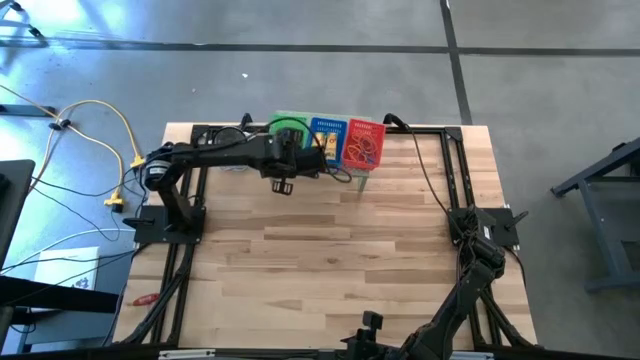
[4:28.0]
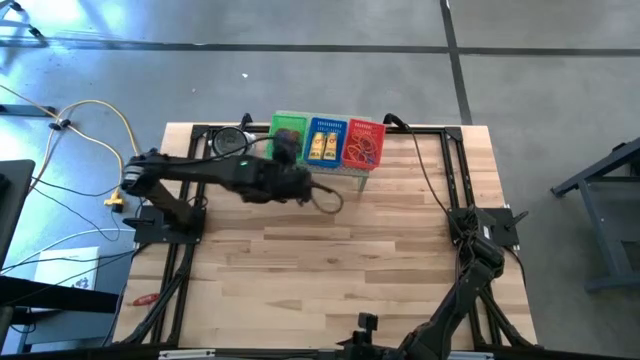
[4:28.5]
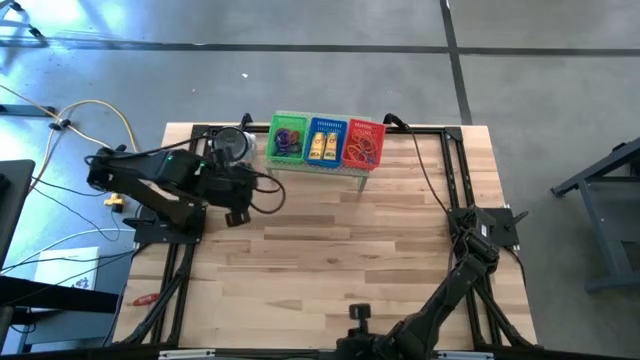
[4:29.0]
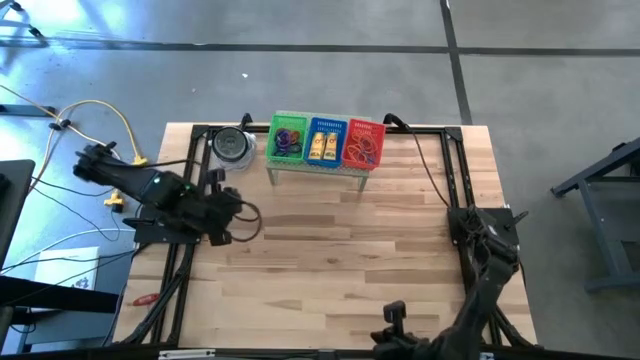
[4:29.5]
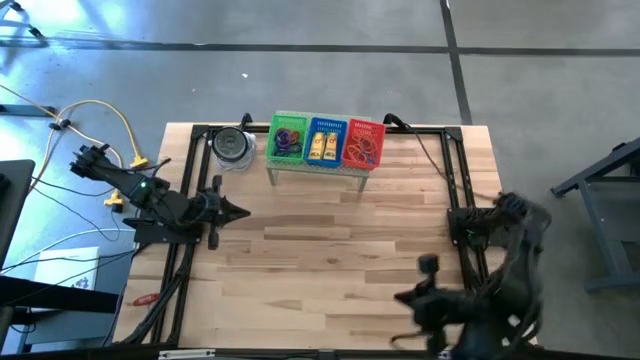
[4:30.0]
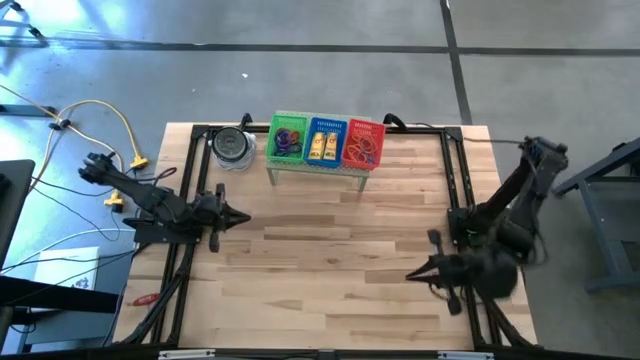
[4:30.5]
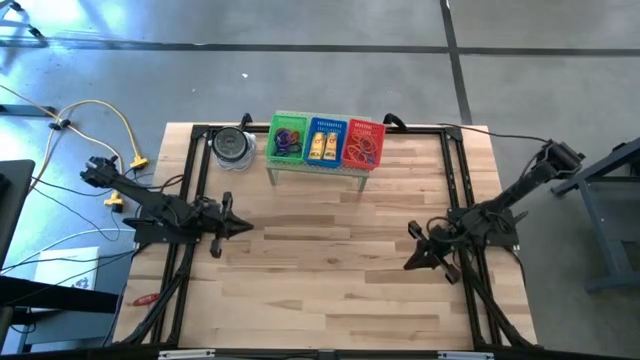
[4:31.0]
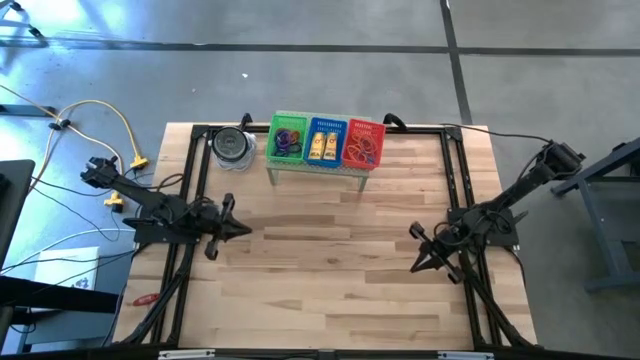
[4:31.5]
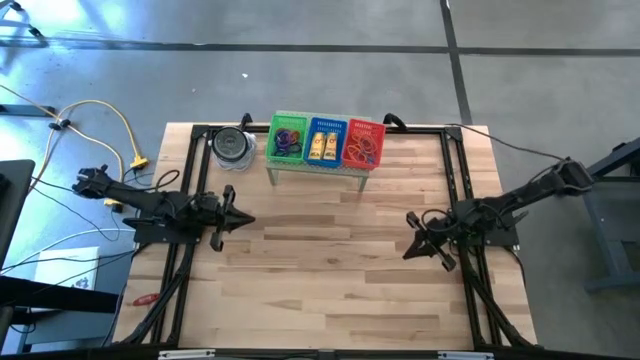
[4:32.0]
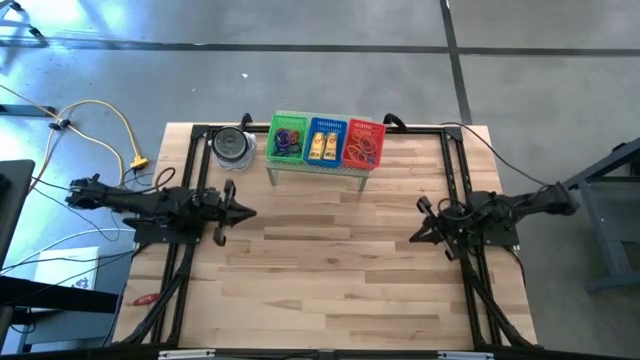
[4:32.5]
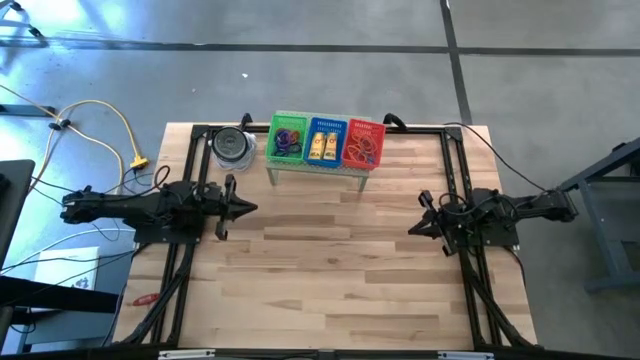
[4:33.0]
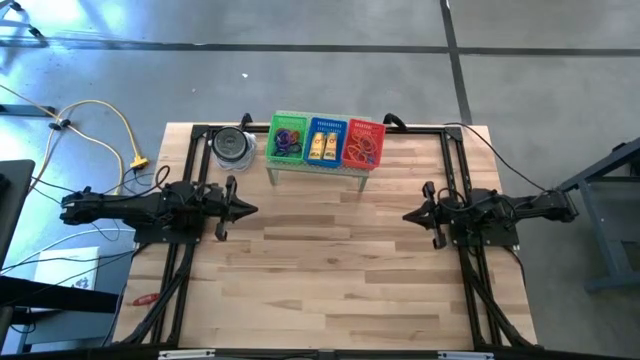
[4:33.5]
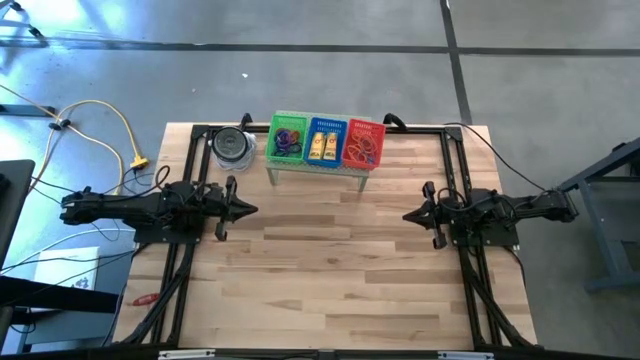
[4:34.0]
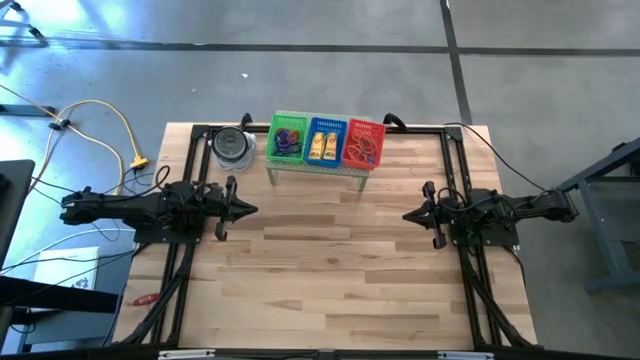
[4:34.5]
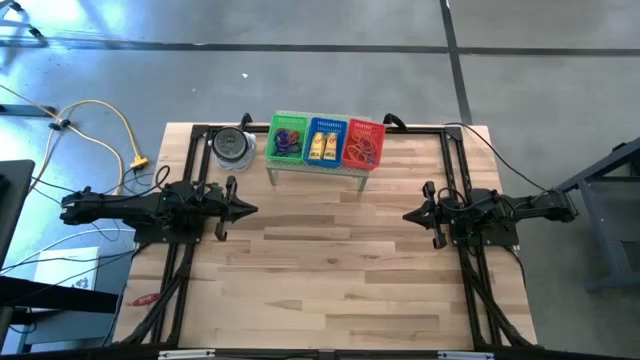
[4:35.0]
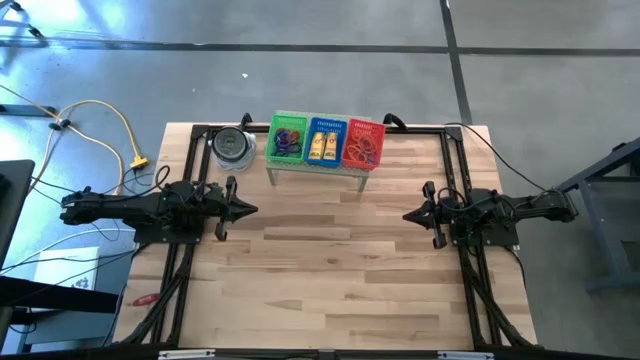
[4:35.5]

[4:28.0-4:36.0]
Task: Pick & Place Office Desk Supplies
Return to Home Position

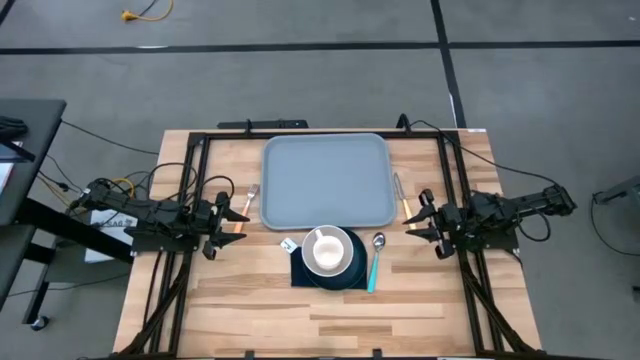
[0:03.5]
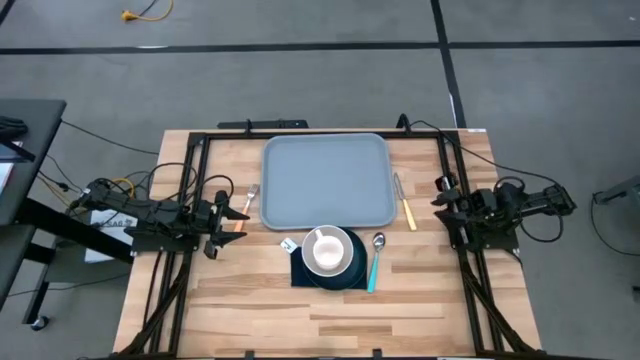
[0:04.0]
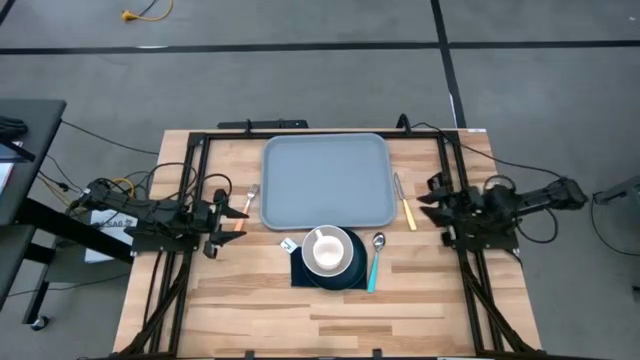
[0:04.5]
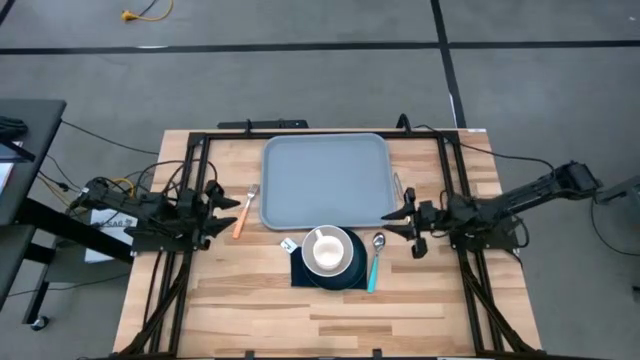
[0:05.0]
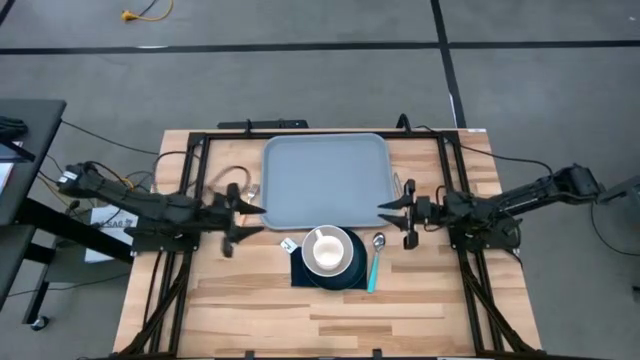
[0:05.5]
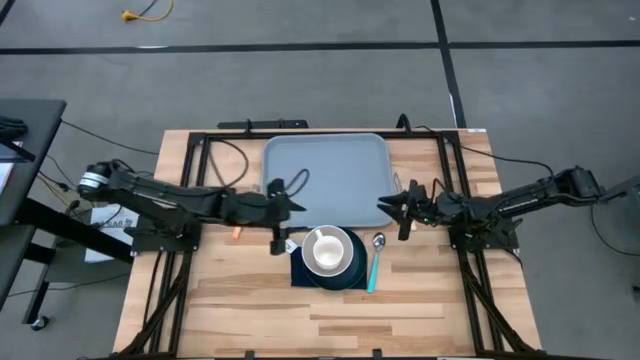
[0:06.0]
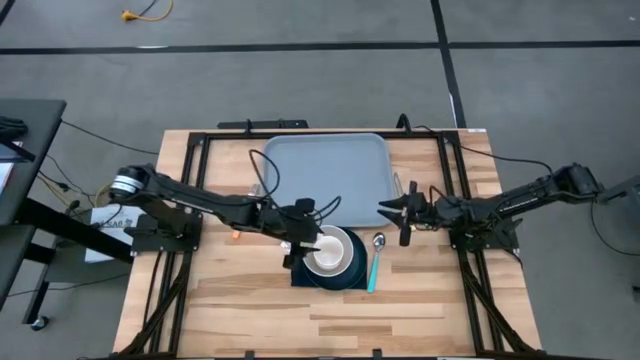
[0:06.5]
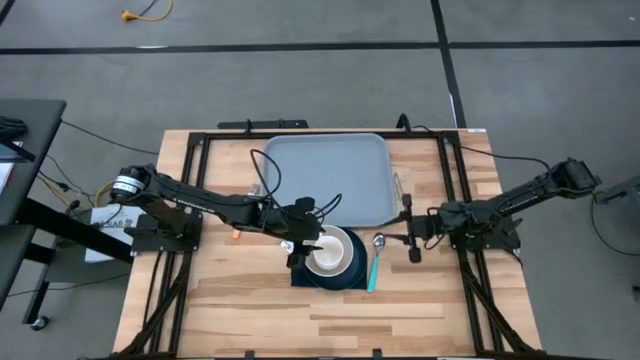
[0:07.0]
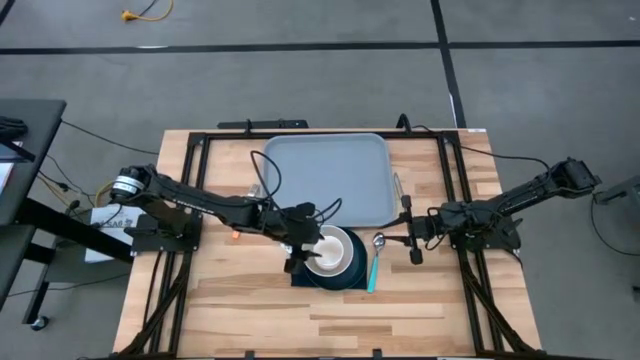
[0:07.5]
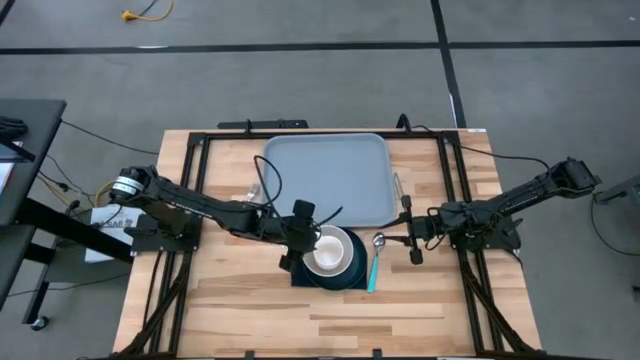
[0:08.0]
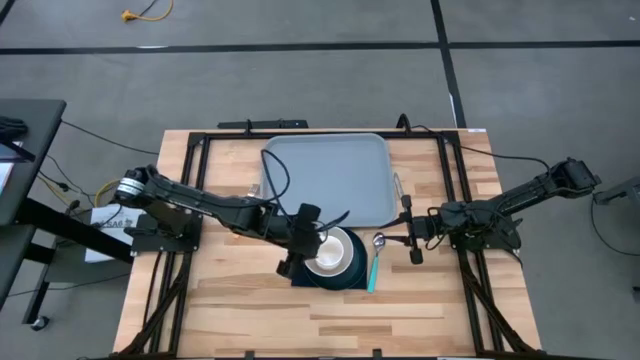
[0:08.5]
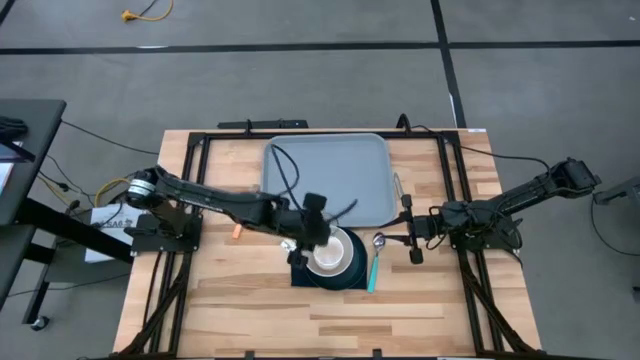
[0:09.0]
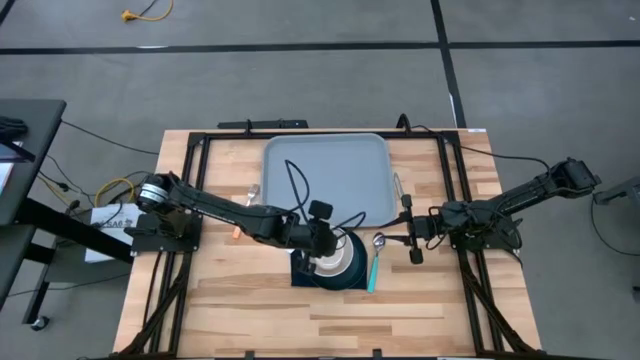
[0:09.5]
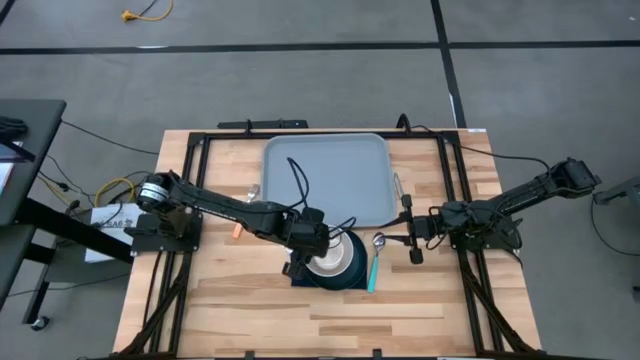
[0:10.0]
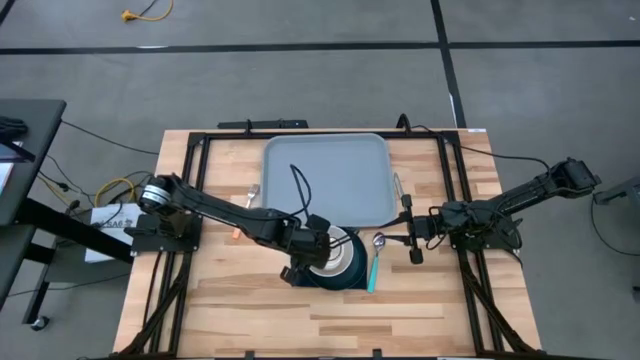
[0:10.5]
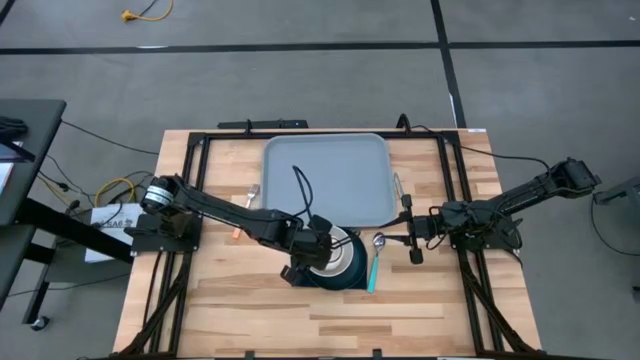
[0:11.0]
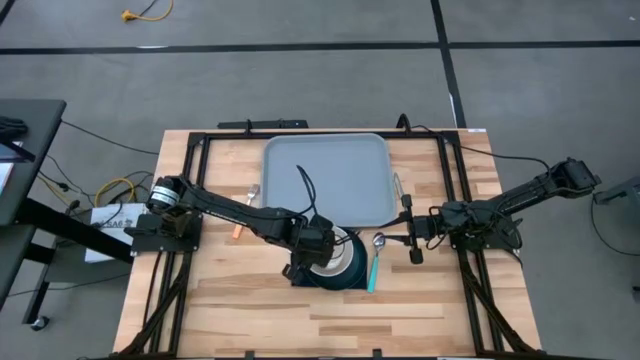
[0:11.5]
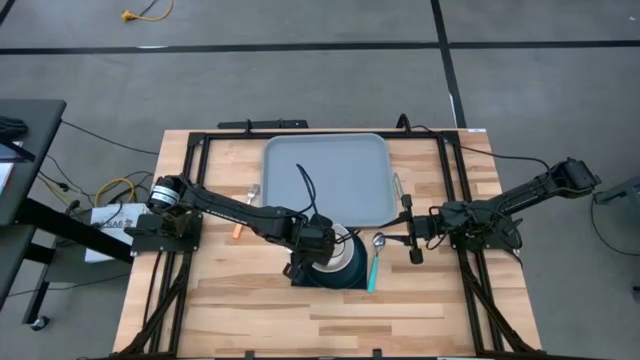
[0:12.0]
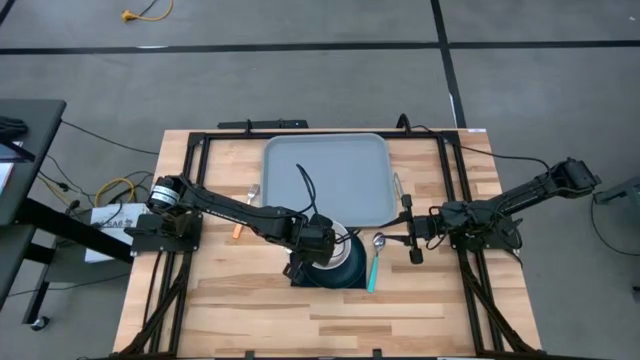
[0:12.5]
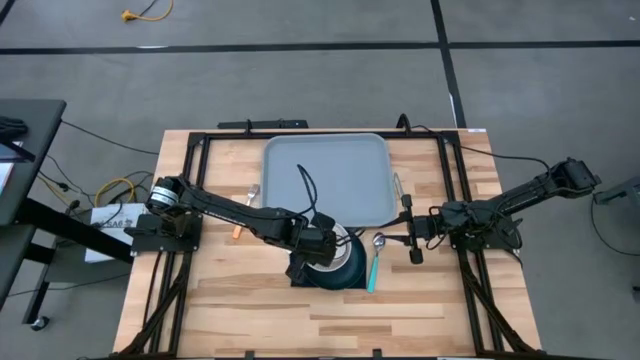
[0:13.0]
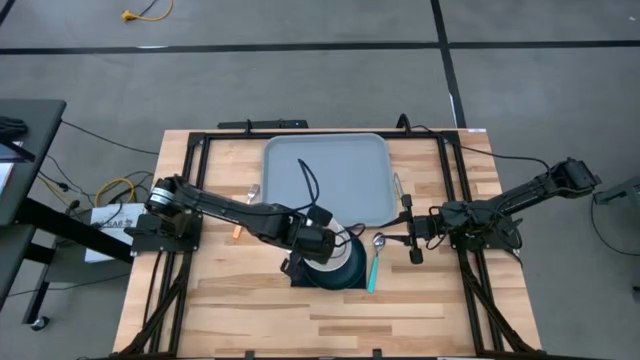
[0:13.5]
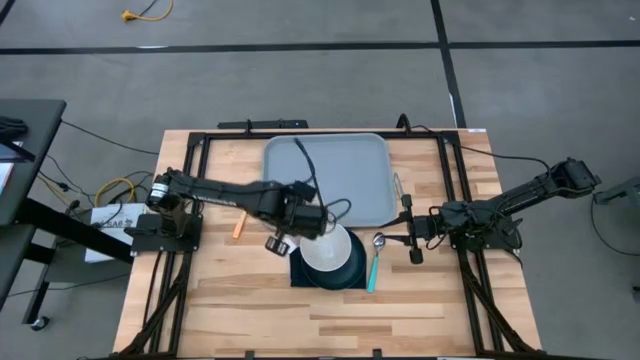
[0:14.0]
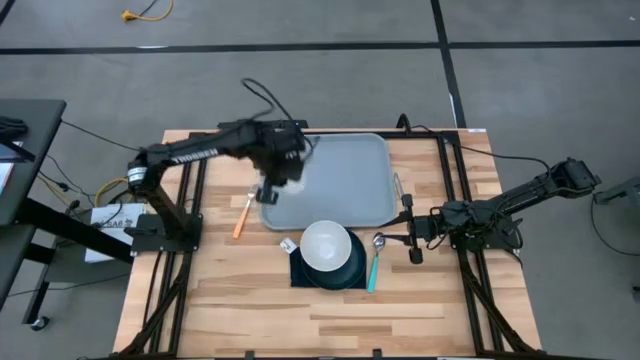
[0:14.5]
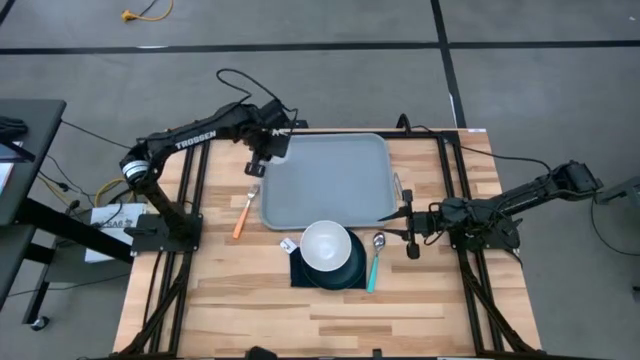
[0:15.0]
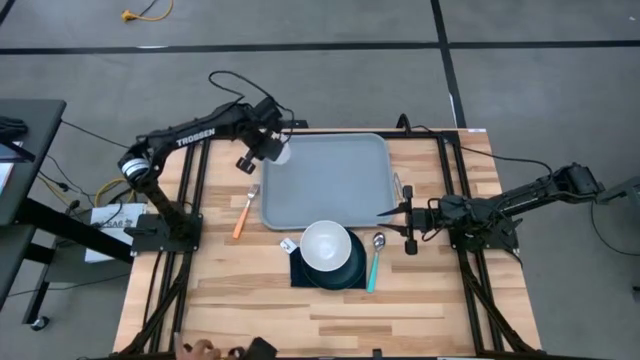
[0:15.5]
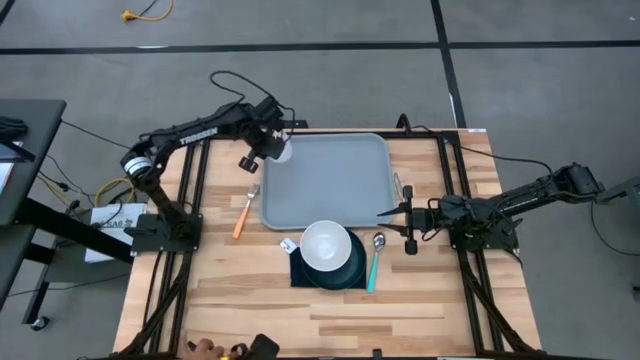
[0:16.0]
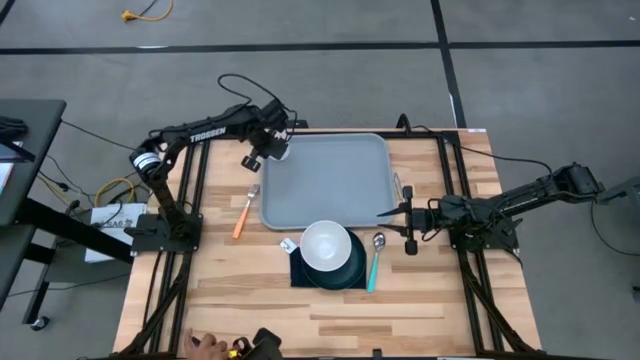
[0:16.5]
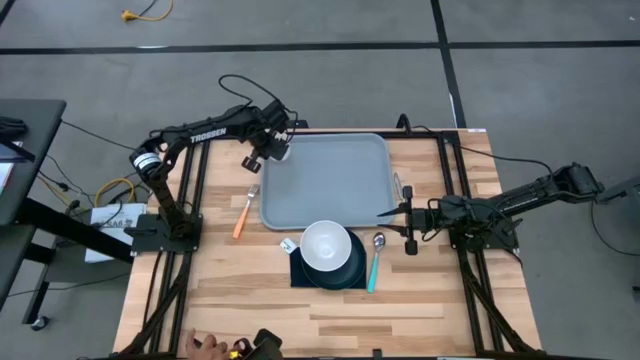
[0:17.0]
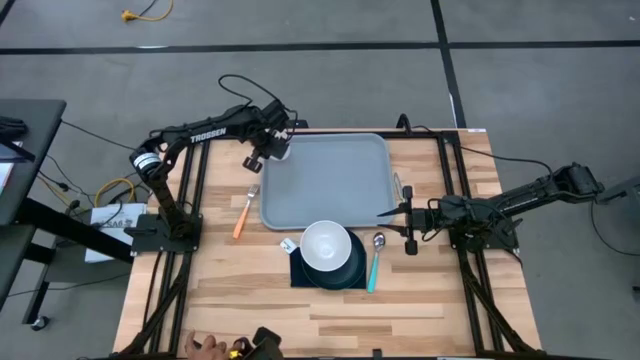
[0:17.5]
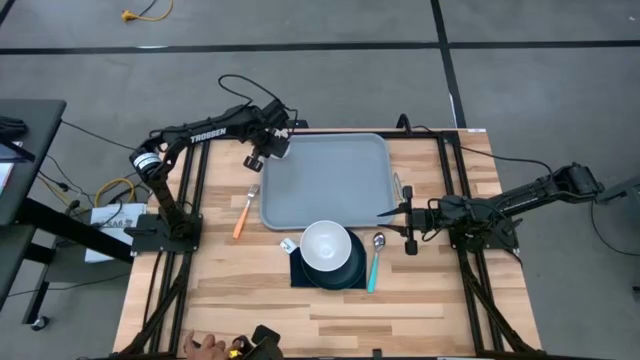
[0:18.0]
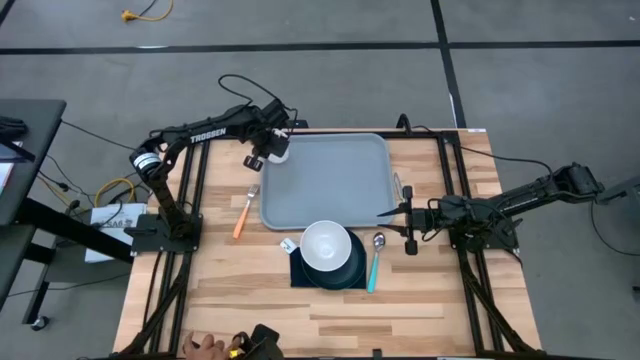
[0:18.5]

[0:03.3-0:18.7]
Task: Set up tray
Put the white mug on the gray tray
